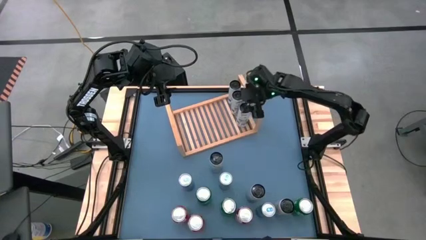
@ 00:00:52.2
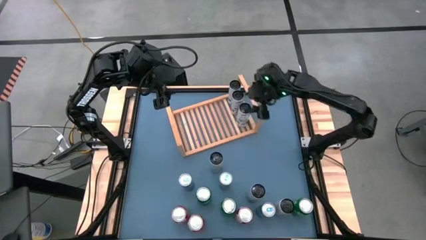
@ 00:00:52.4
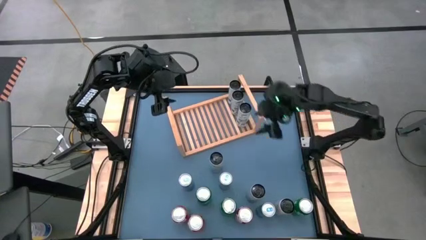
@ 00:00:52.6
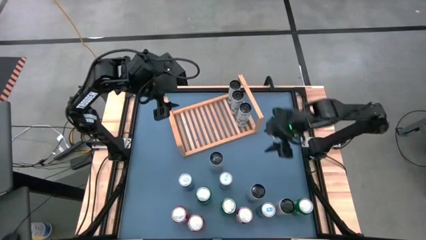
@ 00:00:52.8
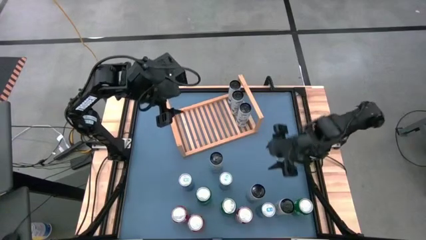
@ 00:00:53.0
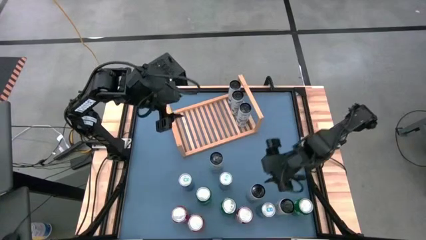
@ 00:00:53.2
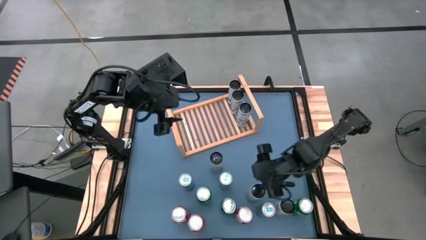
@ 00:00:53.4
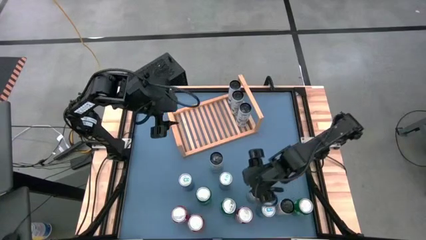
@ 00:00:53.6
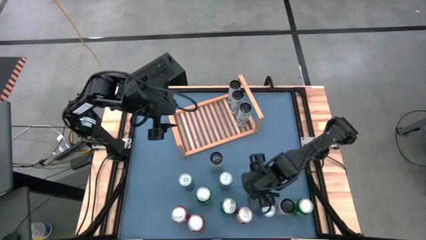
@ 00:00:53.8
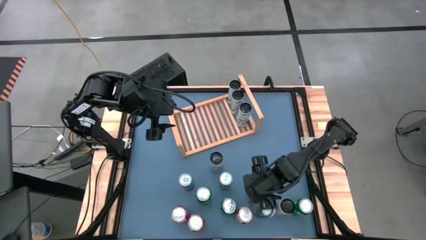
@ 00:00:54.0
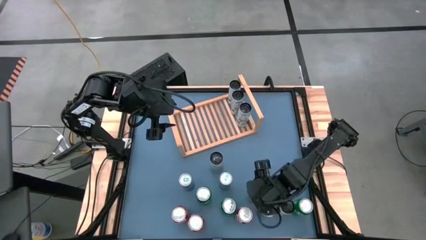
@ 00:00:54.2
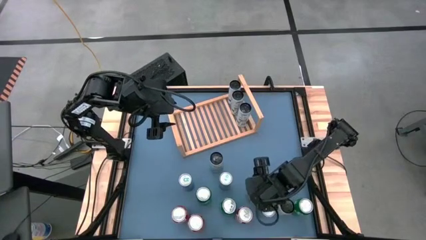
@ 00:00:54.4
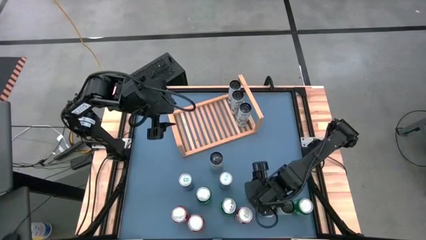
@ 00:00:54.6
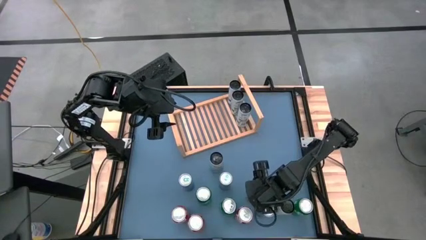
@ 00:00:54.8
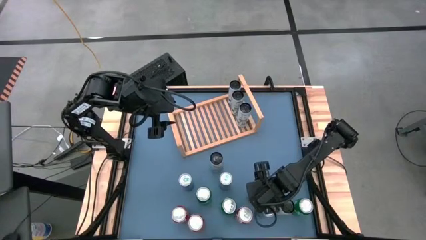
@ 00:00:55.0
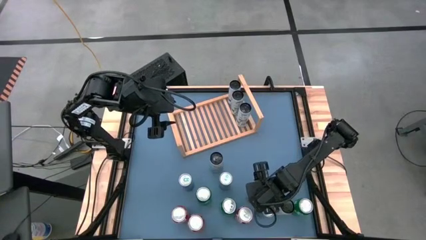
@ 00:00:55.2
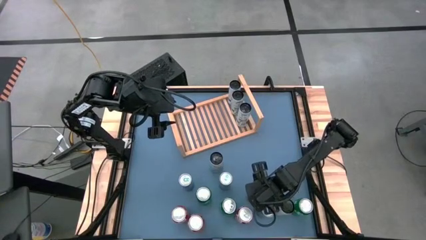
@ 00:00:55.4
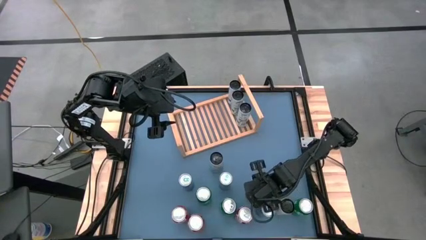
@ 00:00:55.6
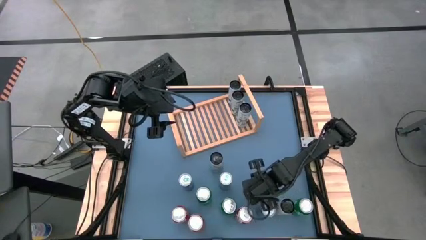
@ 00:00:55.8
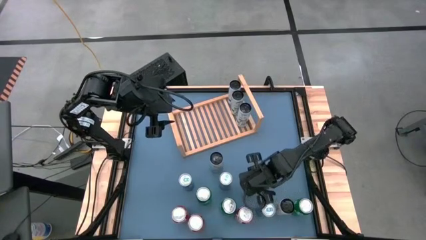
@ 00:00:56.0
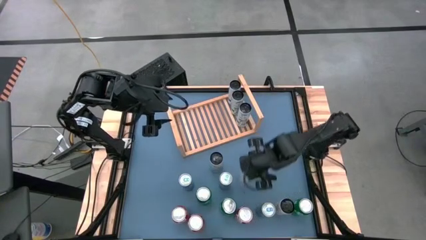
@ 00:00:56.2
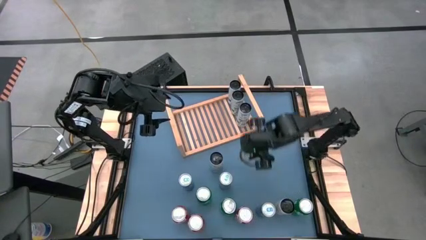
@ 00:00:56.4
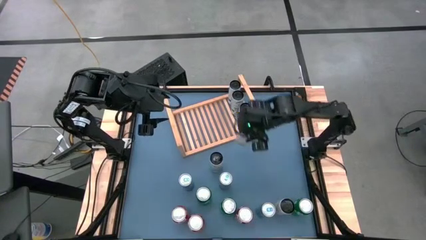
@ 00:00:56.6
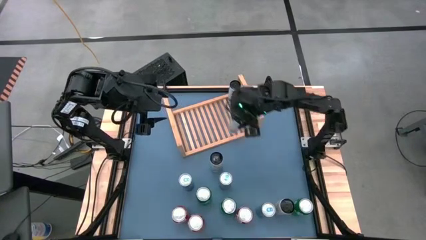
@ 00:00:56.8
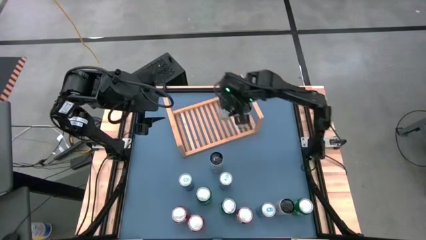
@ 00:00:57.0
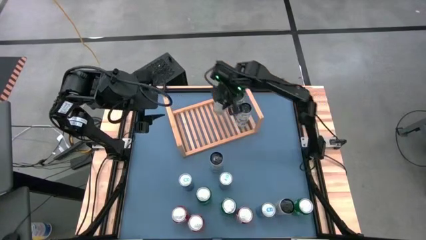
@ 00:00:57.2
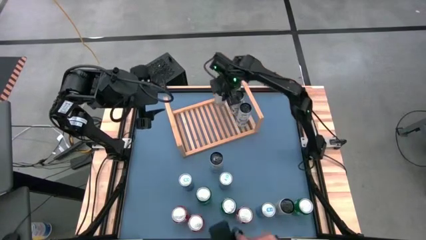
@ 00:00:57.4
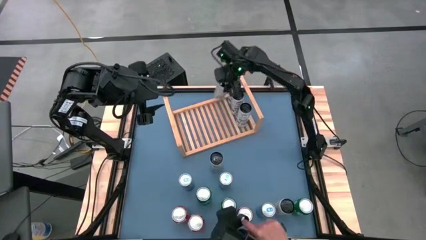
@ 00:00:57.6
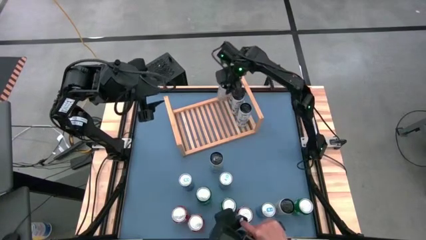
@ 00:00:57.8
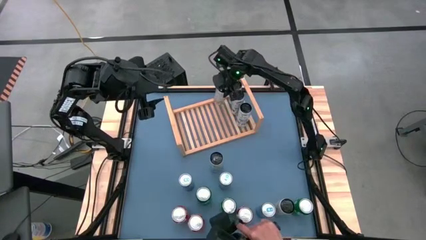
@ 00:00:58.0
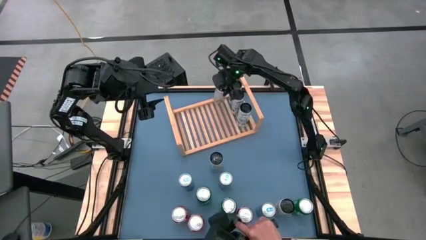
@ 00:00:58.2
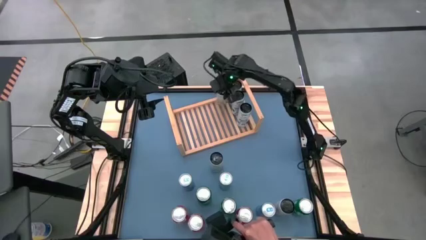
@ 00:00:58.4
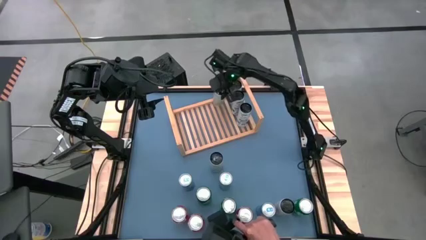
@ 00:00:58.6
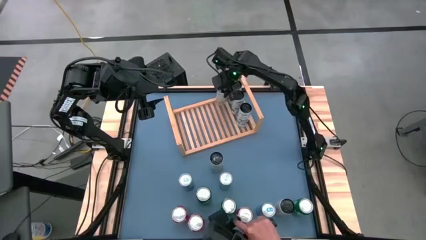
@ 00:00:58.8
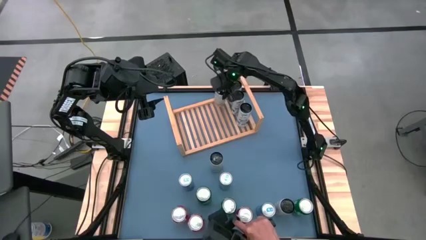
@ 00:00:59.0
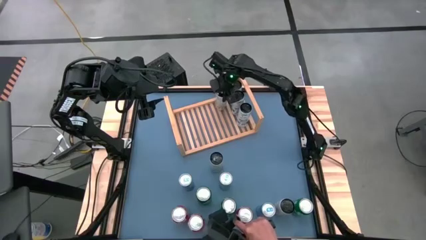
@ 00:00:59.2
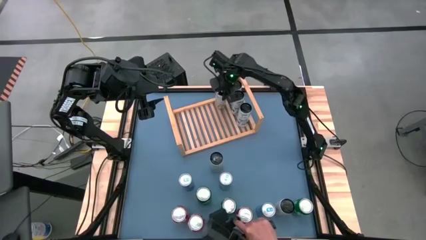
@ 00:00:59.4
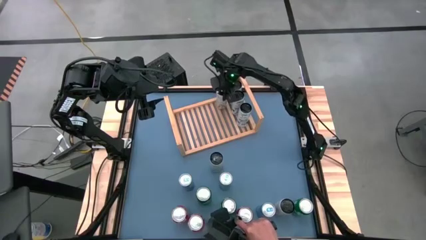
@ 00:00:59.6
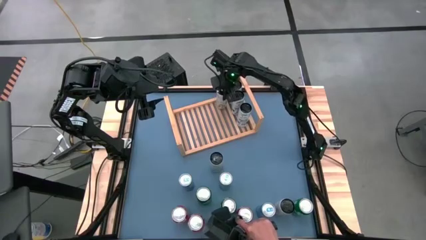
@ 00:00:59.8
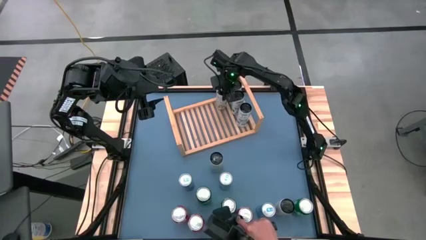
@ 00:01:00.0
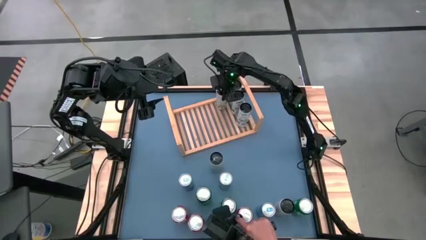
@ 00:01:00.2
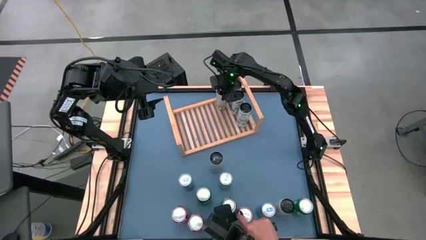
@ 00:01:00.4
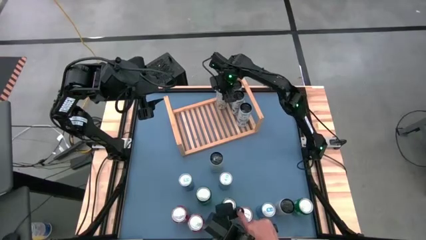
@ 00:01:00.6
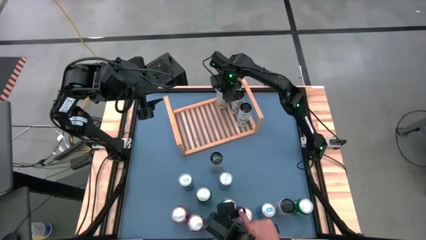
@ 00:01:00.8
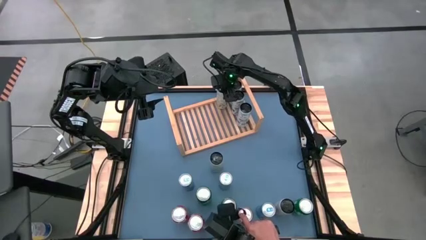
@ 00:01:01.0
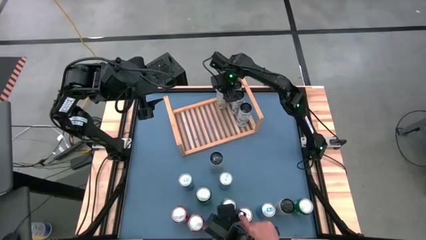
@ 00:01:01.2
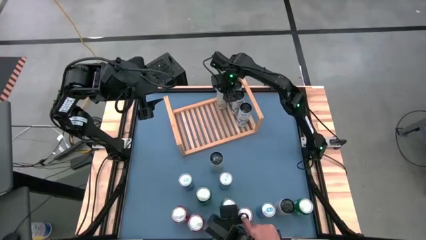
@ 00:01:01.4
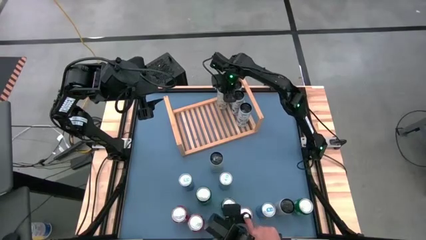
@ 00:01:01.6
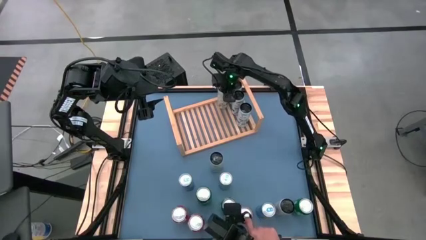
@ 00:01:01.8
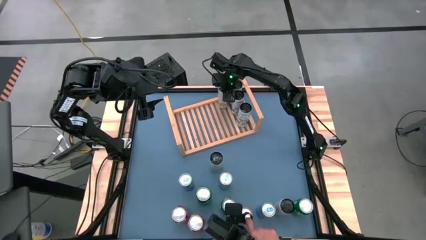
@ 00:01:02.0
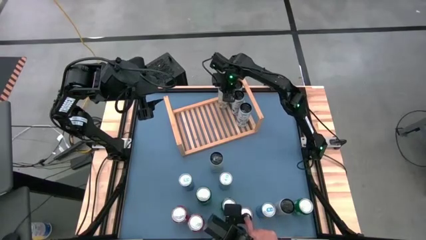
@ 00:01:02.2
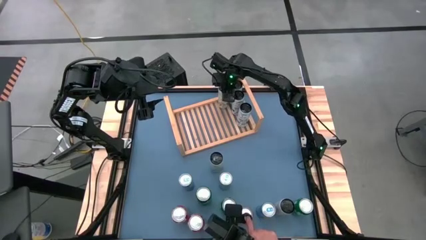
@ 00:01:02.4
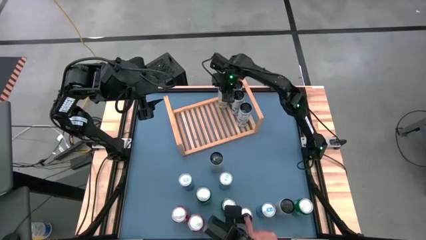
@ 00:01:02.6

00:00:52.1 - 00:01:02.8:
Task: Place canned beverage on shelf
Put the white-yellow soda can on the shelf
